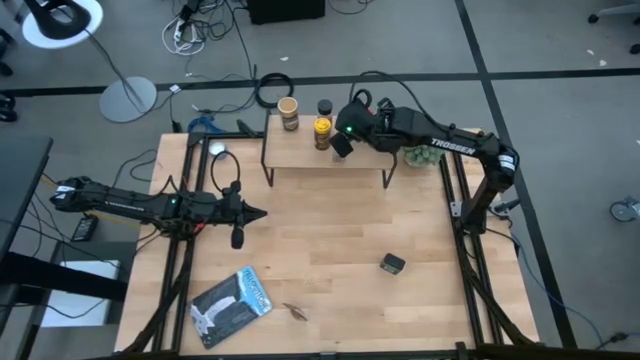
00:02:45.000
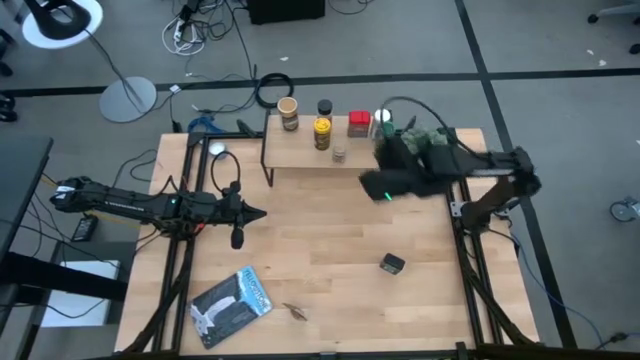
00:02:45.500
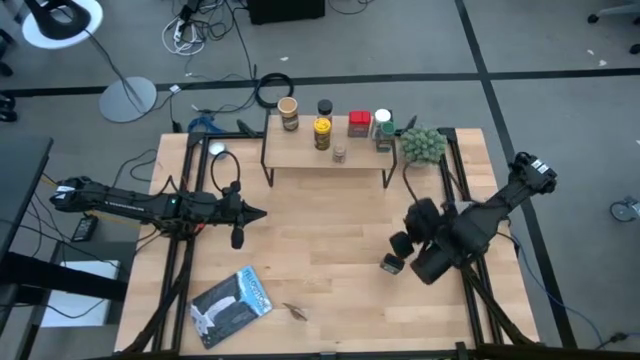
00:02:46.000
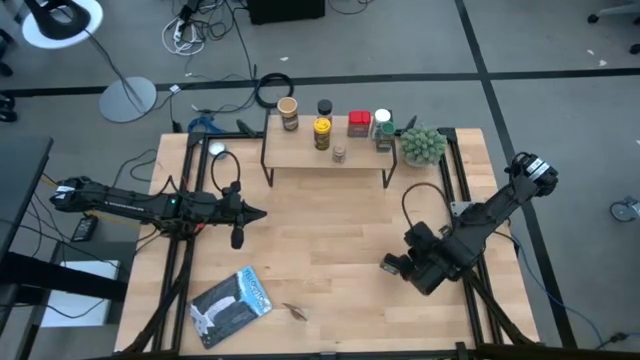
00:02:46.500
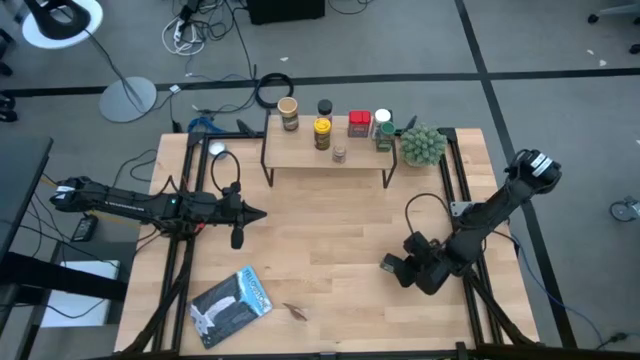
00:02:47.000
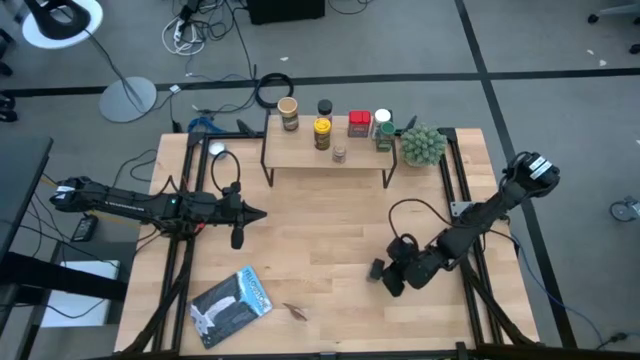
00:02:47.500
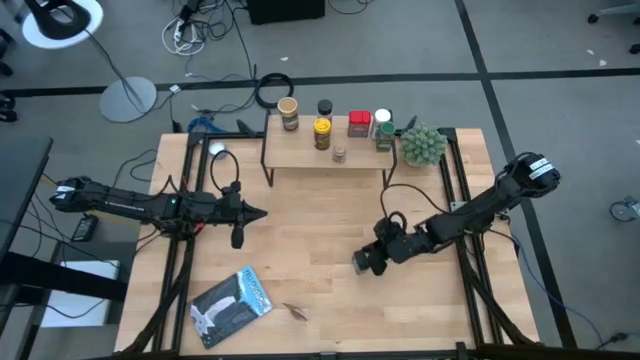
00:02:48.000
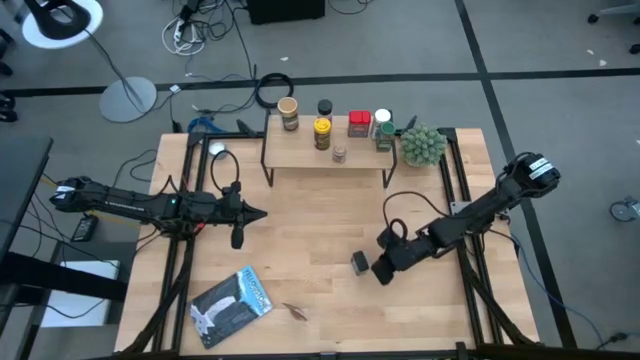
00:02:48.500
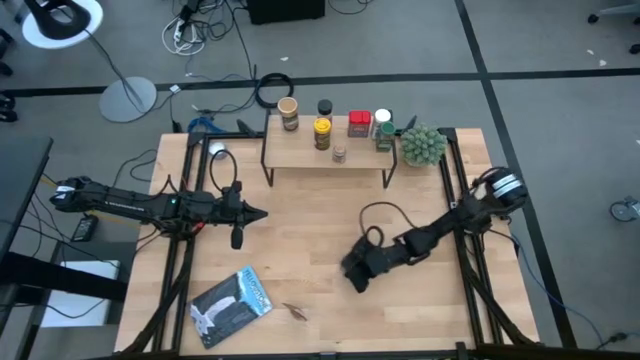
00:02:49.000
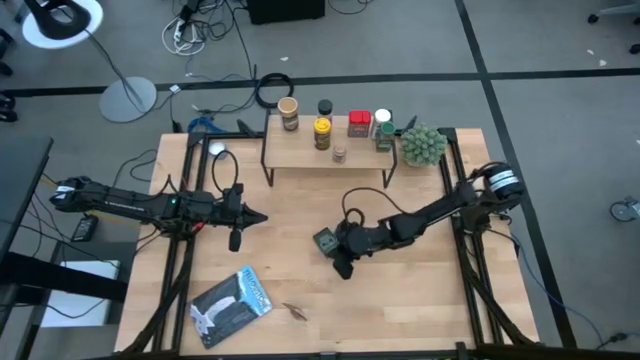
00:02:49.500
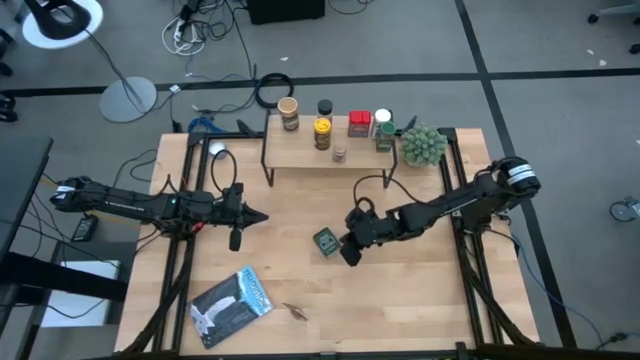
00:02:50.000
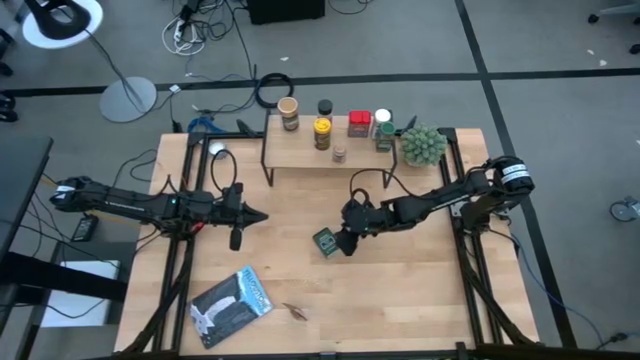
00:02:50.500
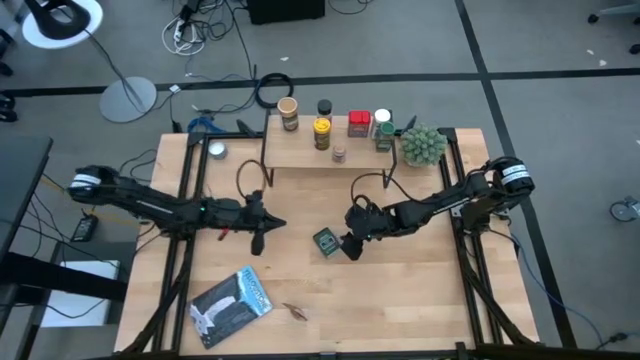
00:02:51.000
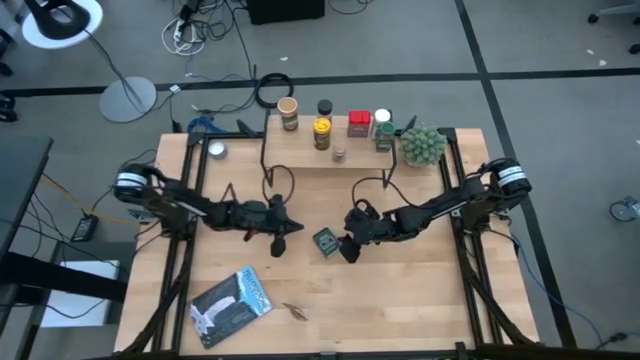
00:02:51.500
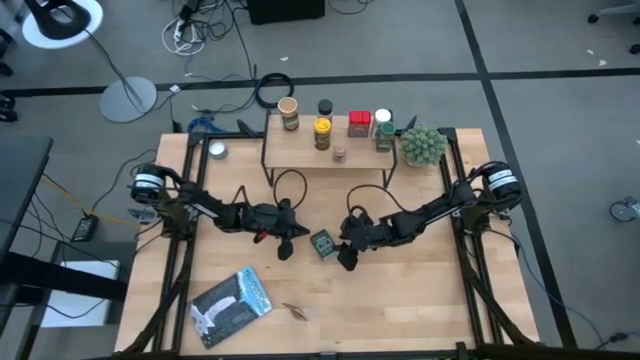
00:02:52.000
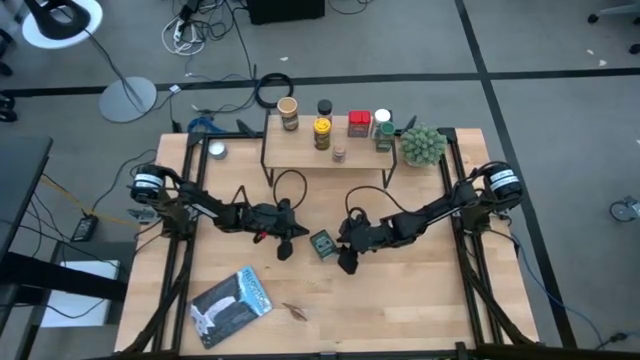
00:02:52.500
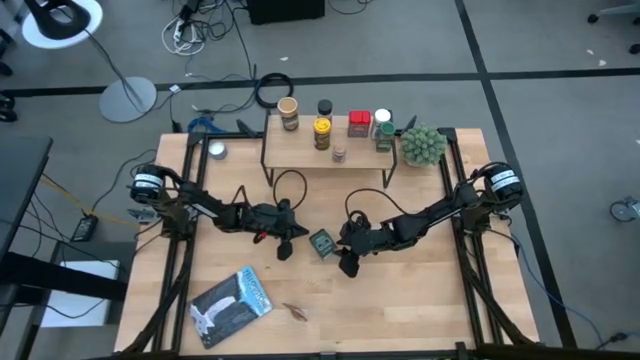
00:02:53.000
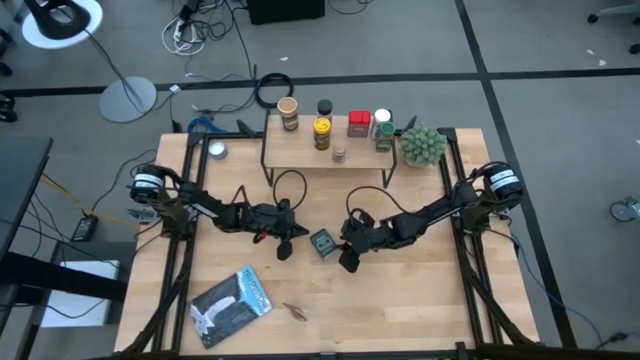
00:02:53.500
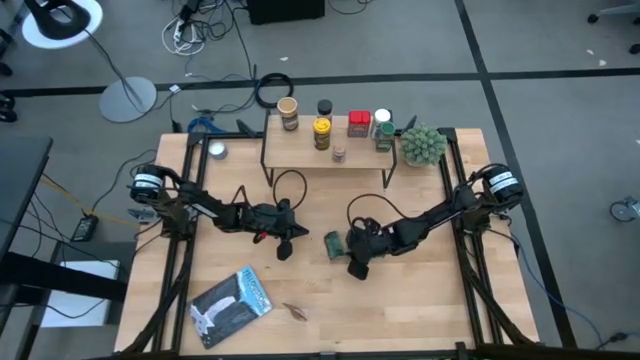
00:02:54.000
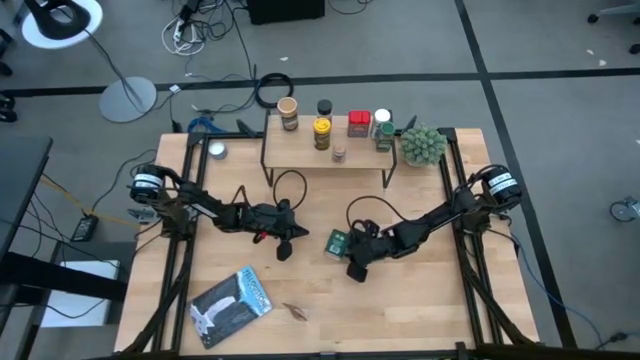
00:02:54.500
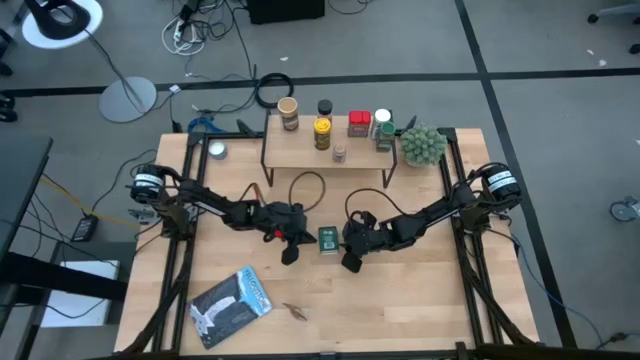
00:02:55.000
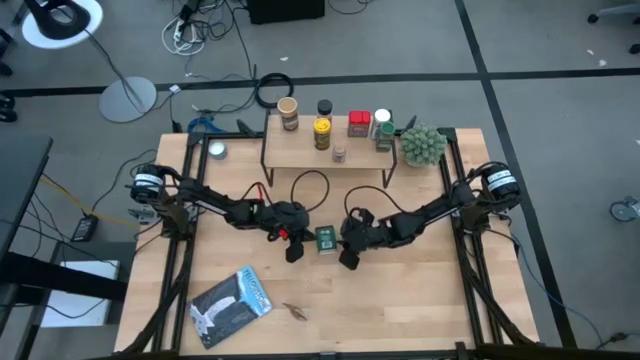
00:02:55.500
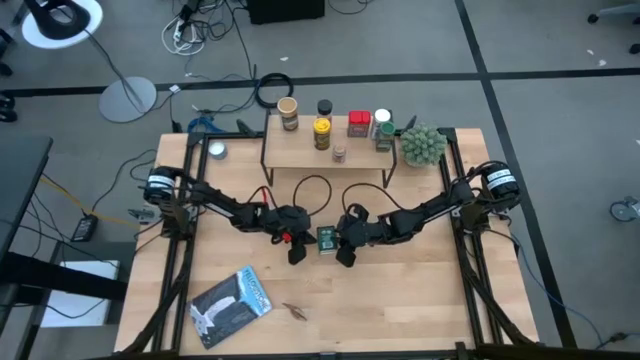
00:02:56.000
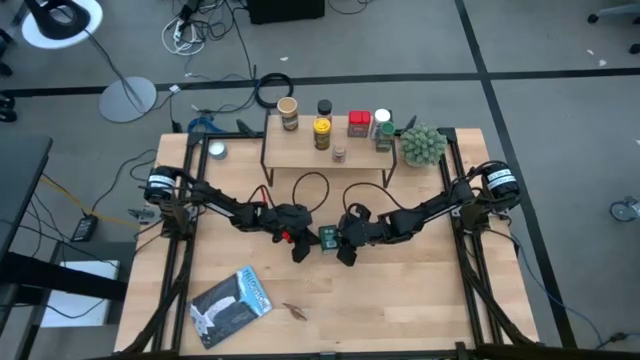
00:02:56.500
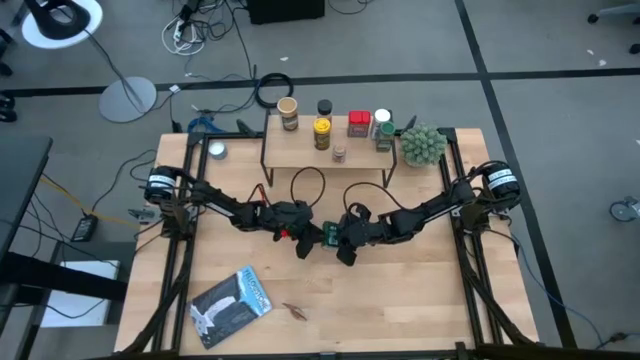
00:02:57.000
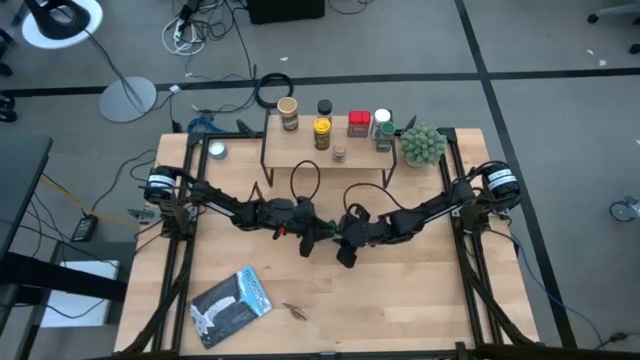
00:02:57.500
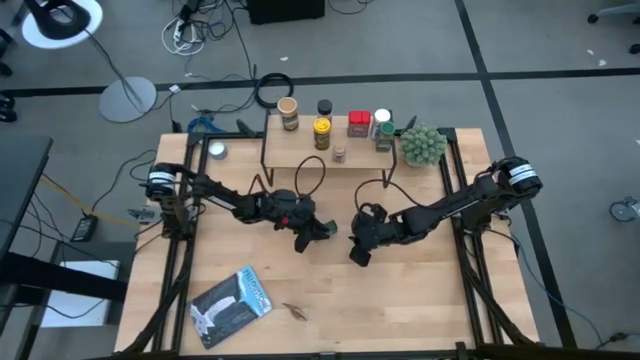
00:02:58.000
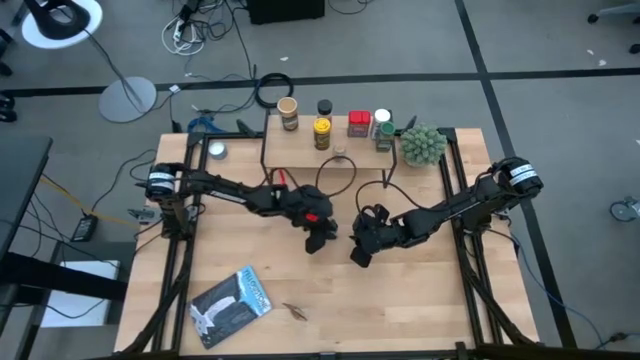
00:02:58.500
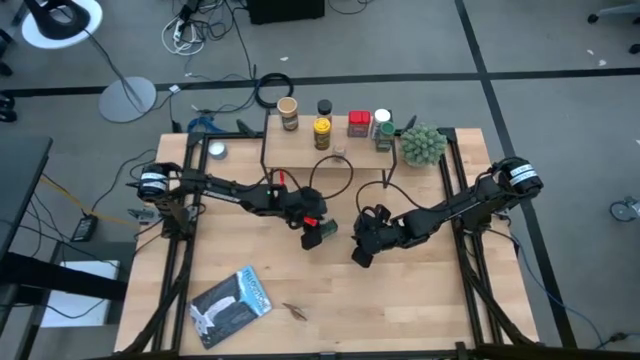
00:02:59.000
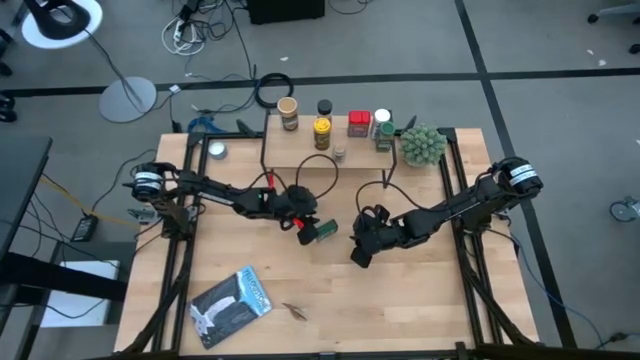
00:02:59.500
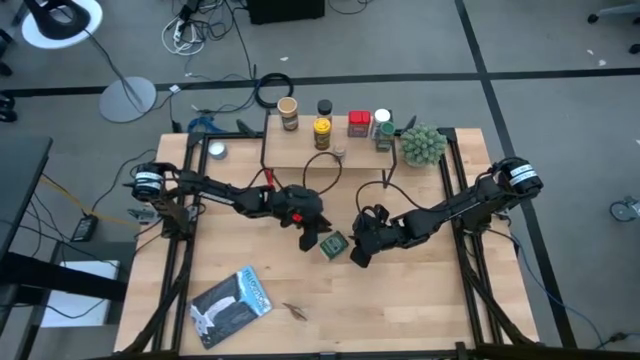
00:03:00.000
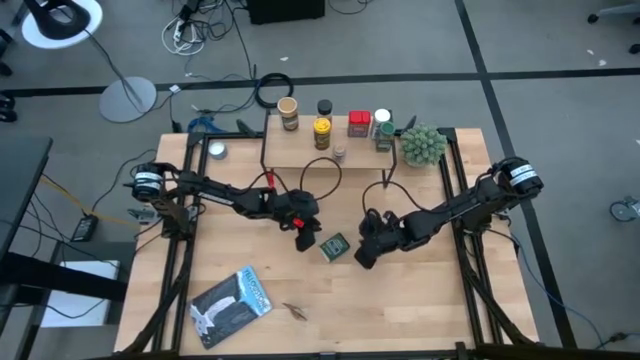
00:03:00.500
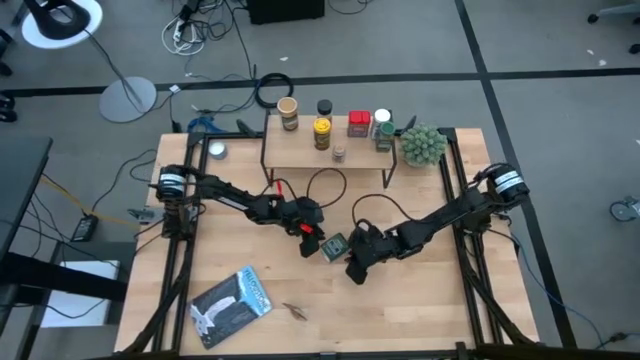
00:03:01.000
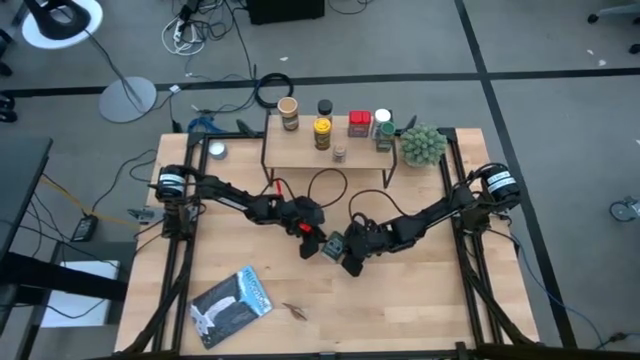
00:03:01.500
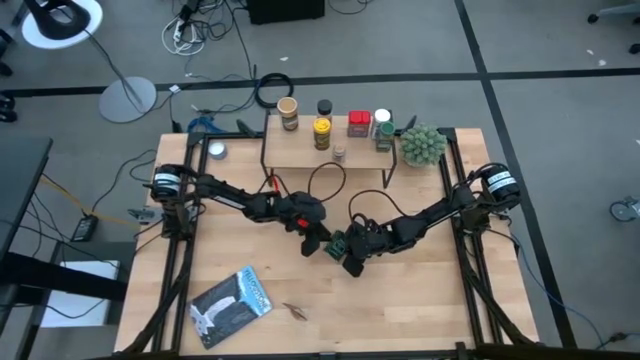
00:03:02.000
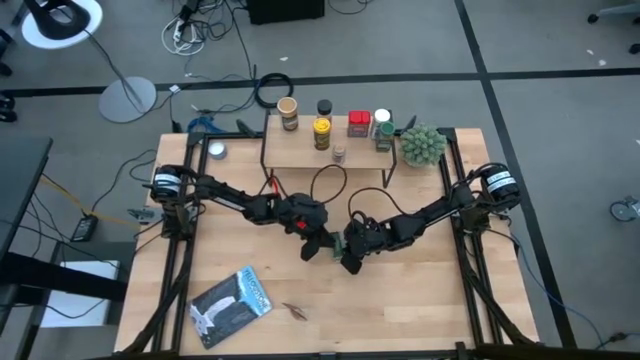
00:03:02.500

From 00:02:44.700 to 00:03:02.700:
Task: Shelf spices
Put the green seasoning can on the shelf aligned with the other red seasoning can

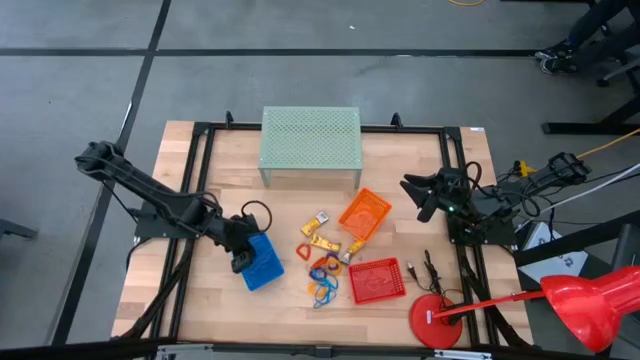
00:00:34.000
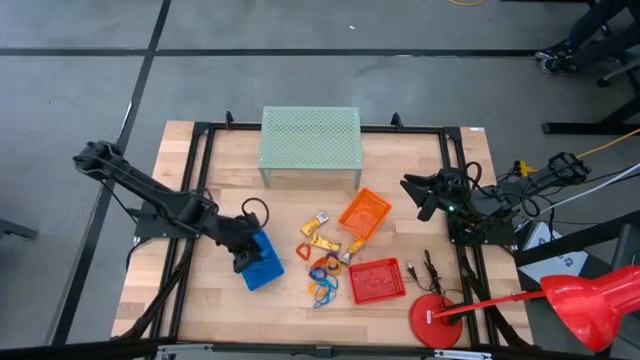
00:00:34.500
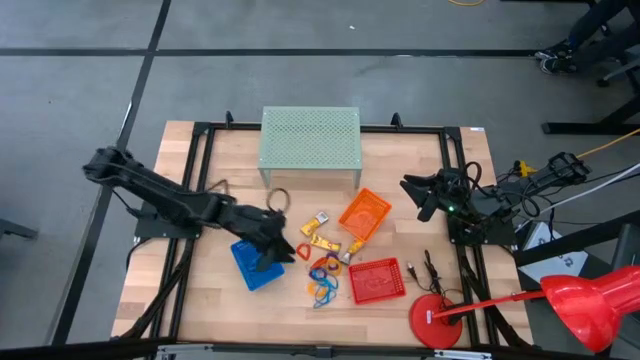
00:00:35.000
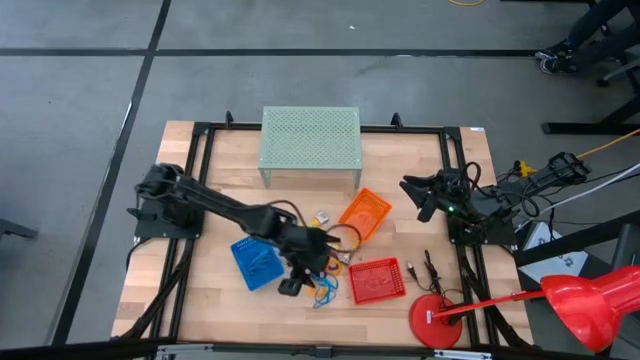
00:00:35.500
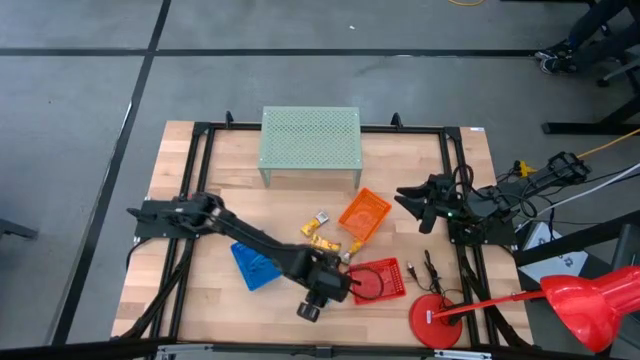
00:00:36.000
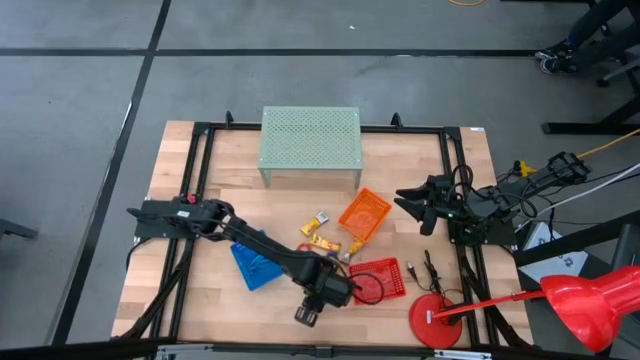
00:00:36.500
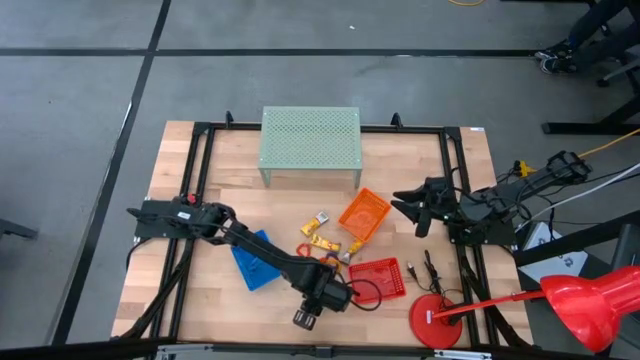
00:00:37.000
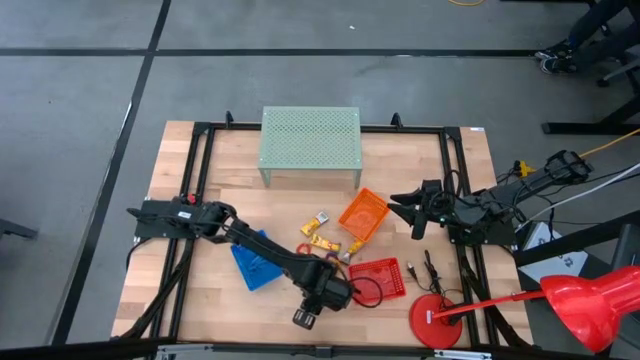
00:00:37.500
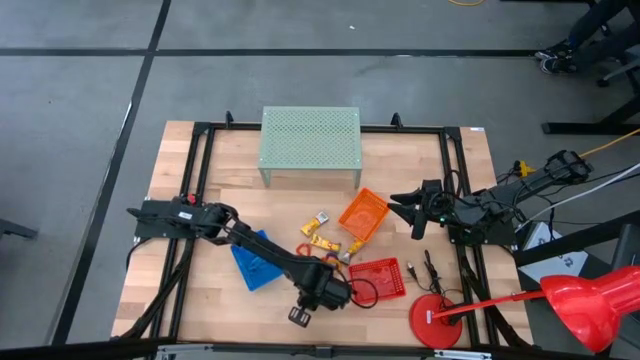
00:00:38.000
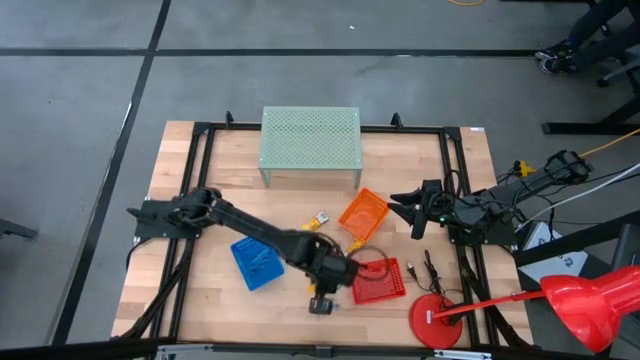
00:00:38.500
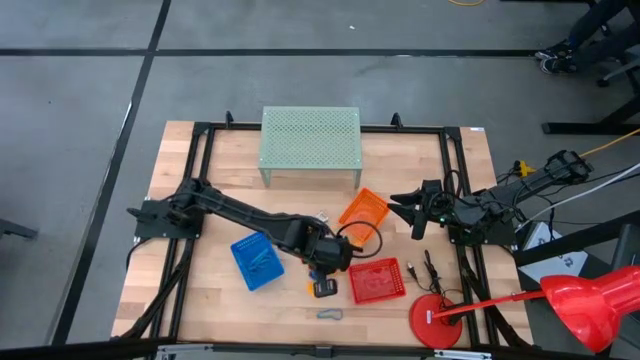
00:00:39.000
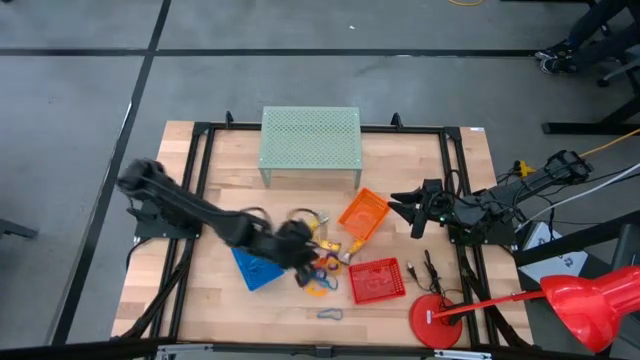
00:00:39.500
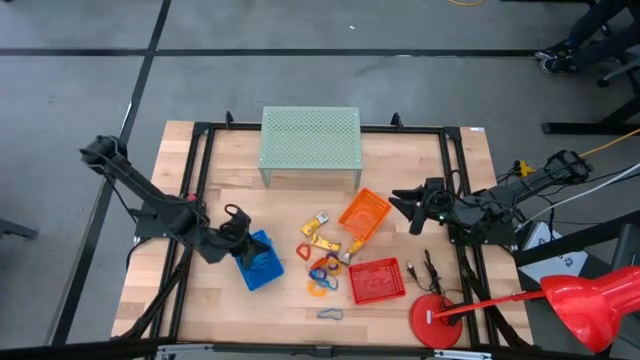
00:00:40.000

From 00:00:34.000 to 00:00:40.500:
Task: Pick & Place Office Desk Supplies
Put the blue rubberband into the blue bin
